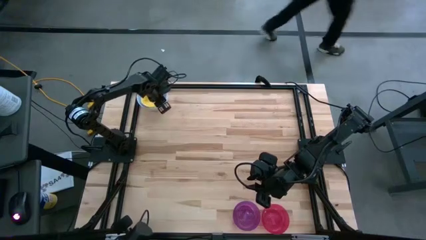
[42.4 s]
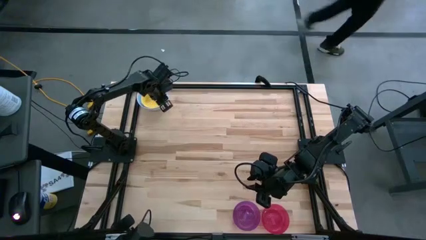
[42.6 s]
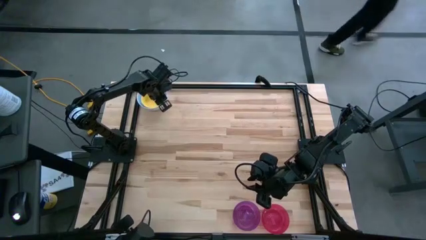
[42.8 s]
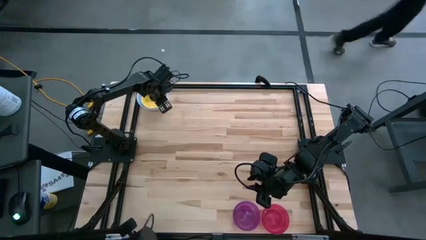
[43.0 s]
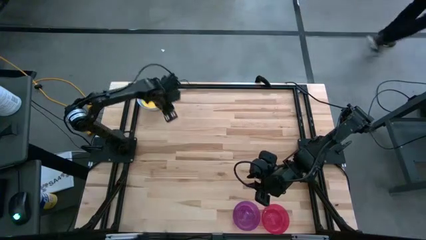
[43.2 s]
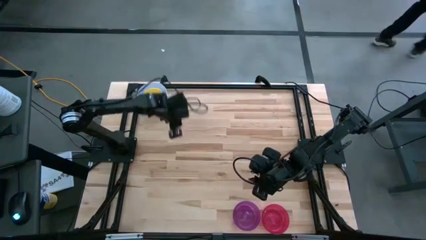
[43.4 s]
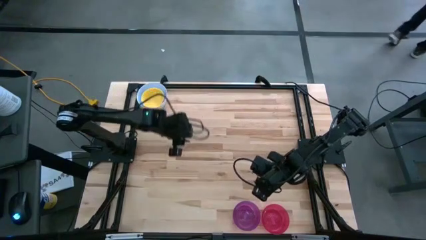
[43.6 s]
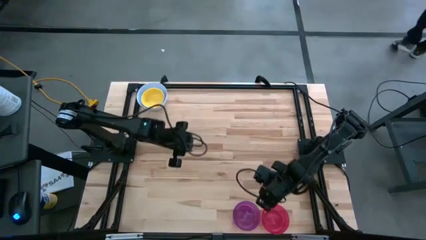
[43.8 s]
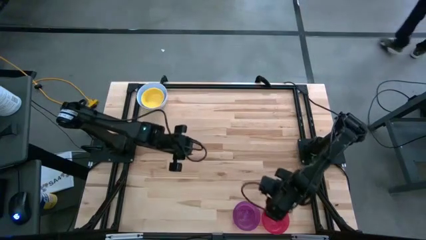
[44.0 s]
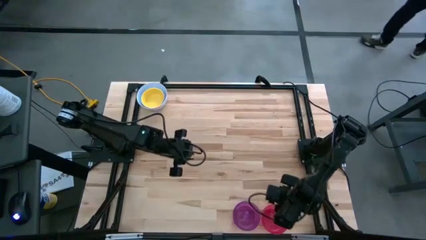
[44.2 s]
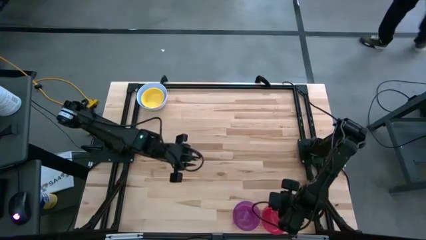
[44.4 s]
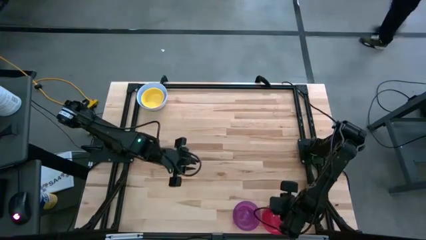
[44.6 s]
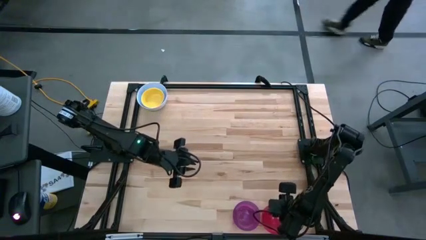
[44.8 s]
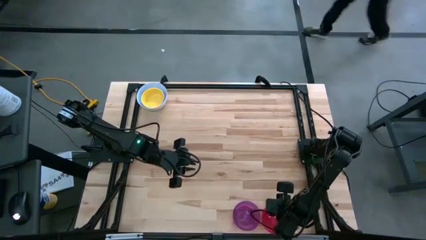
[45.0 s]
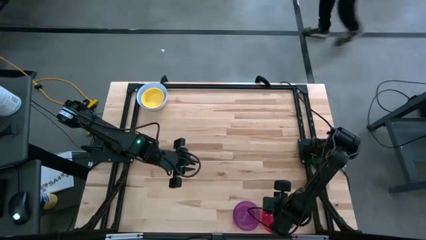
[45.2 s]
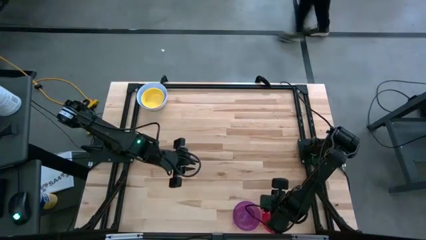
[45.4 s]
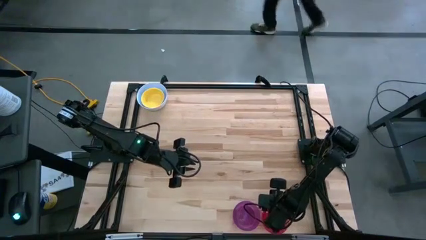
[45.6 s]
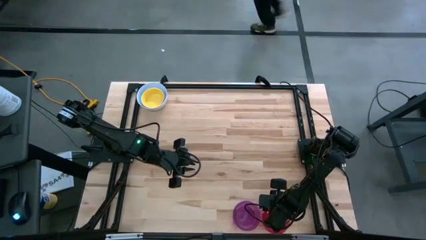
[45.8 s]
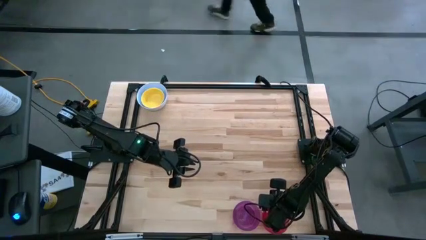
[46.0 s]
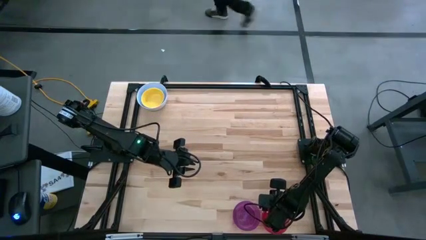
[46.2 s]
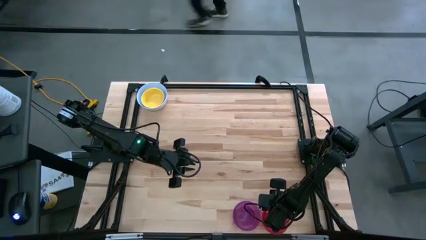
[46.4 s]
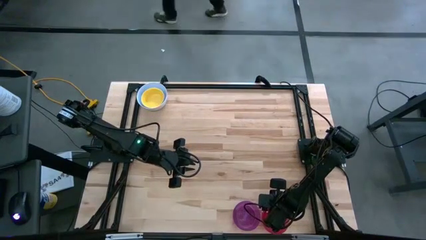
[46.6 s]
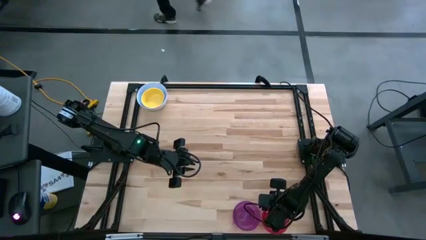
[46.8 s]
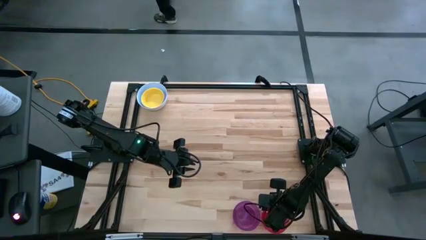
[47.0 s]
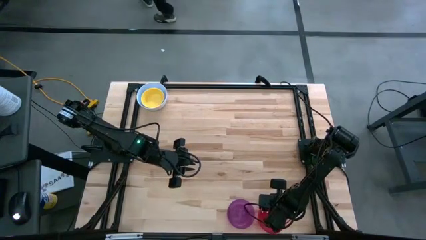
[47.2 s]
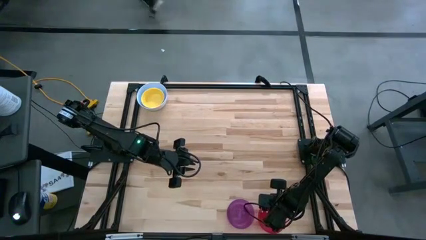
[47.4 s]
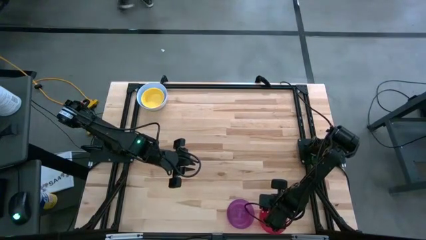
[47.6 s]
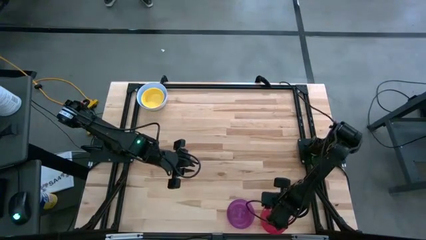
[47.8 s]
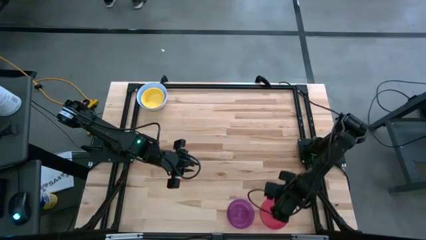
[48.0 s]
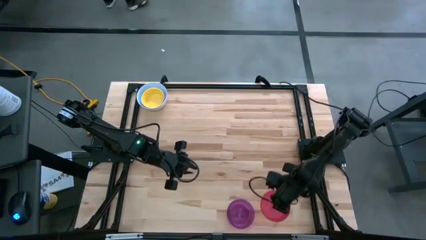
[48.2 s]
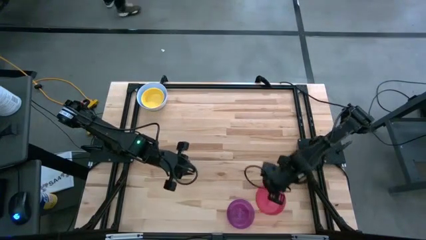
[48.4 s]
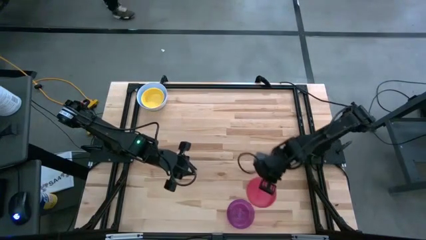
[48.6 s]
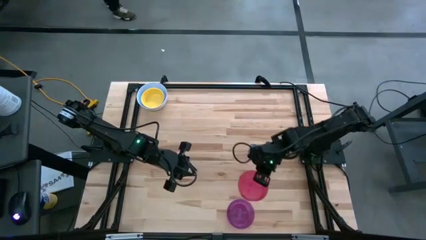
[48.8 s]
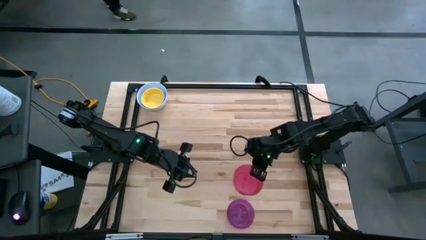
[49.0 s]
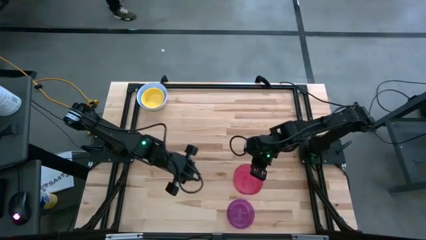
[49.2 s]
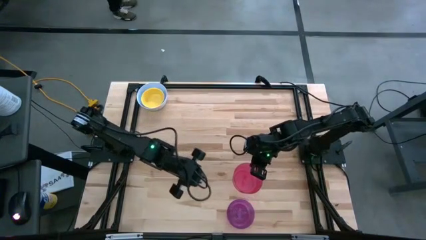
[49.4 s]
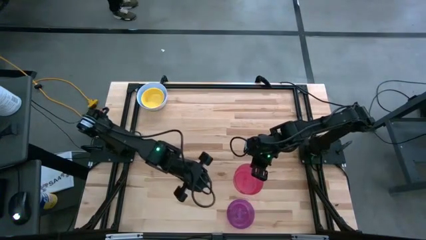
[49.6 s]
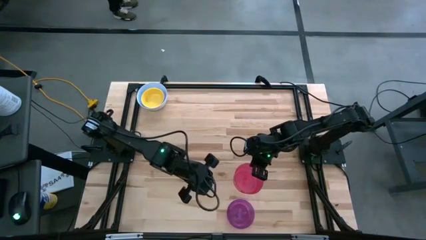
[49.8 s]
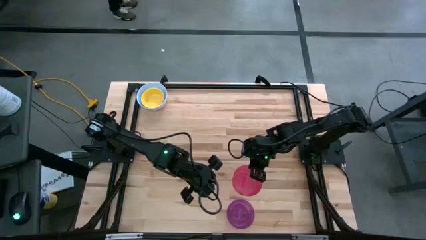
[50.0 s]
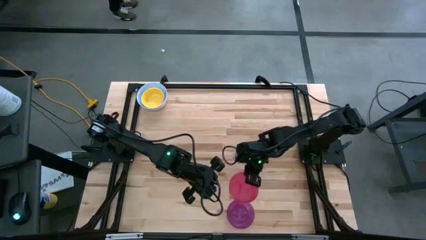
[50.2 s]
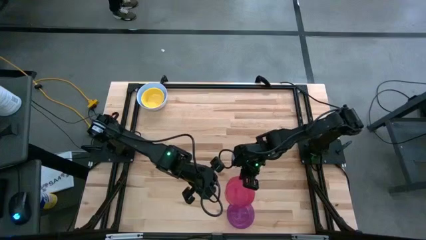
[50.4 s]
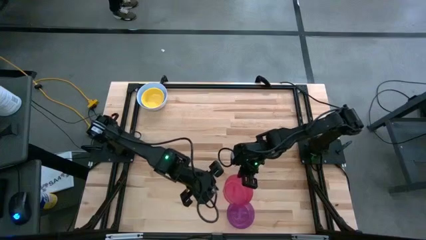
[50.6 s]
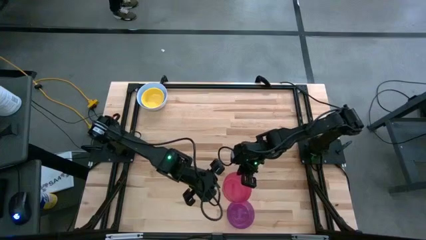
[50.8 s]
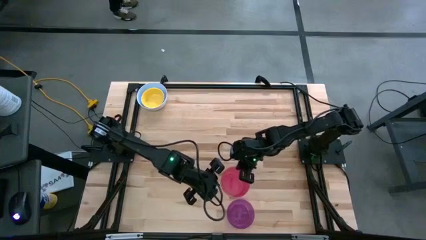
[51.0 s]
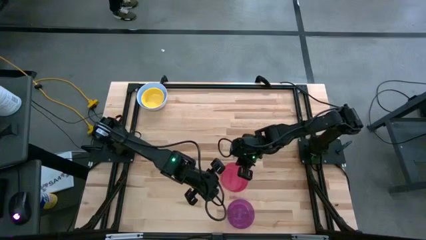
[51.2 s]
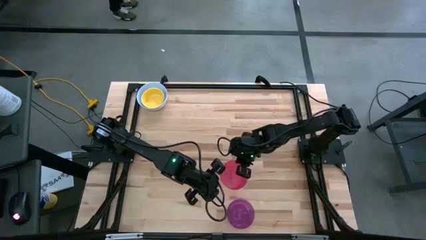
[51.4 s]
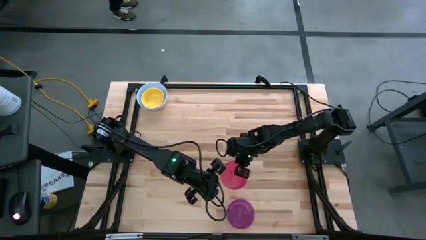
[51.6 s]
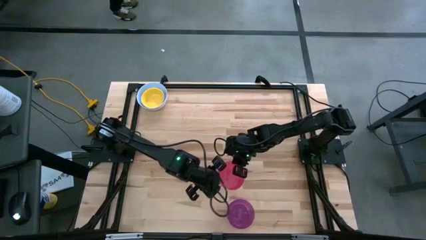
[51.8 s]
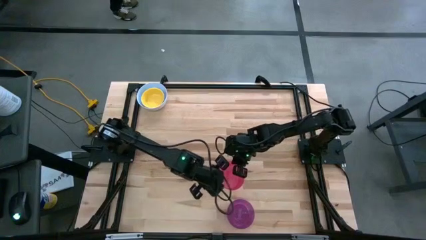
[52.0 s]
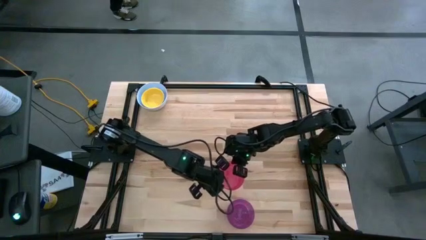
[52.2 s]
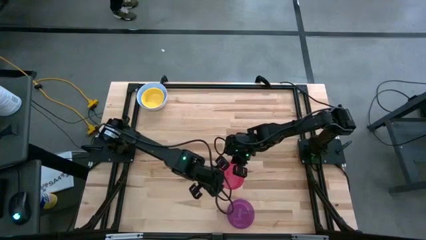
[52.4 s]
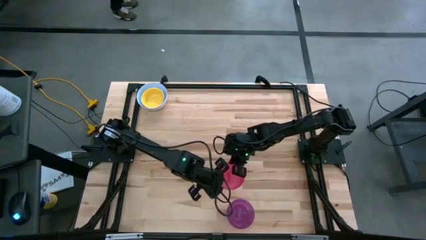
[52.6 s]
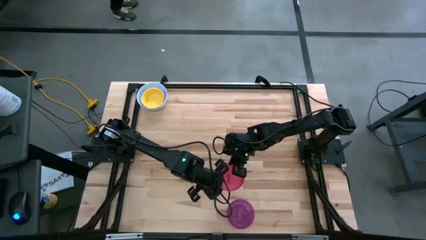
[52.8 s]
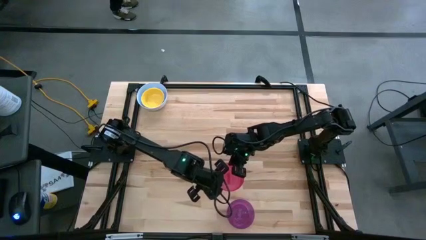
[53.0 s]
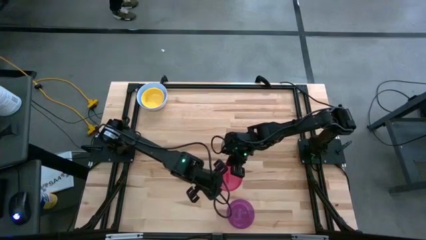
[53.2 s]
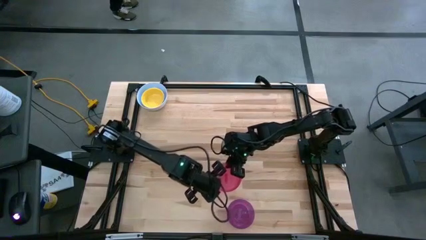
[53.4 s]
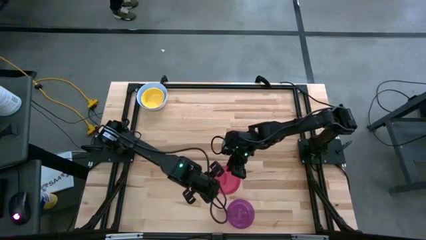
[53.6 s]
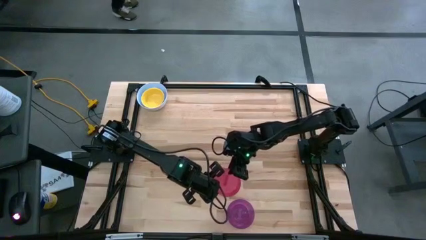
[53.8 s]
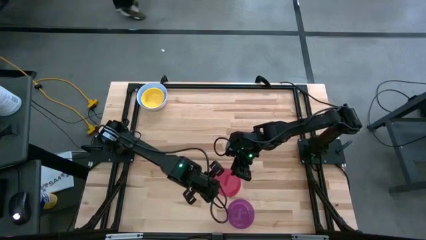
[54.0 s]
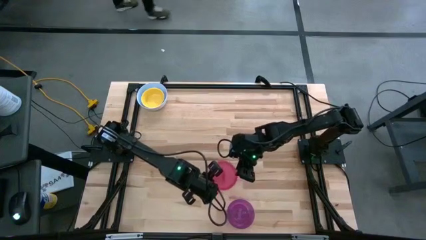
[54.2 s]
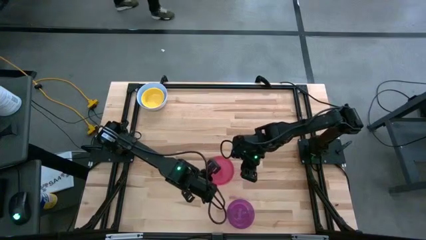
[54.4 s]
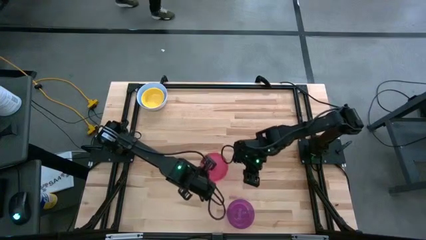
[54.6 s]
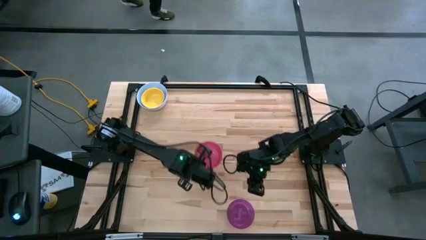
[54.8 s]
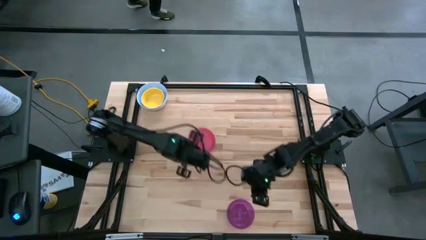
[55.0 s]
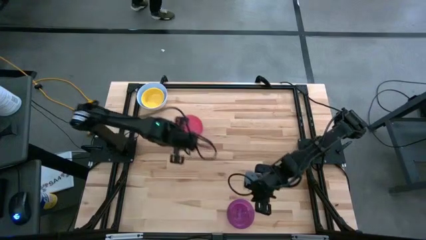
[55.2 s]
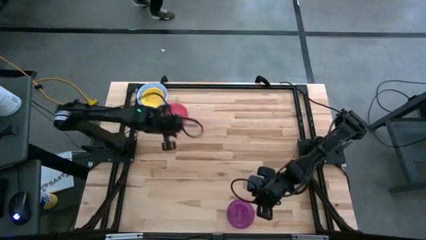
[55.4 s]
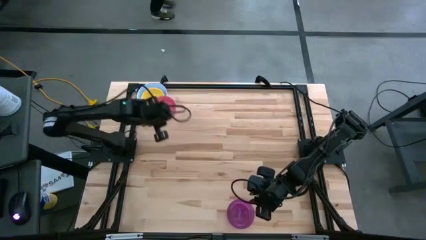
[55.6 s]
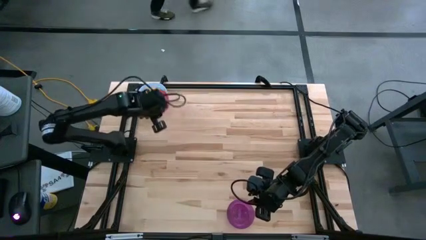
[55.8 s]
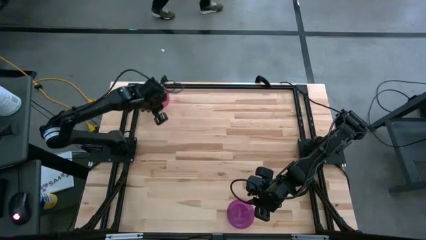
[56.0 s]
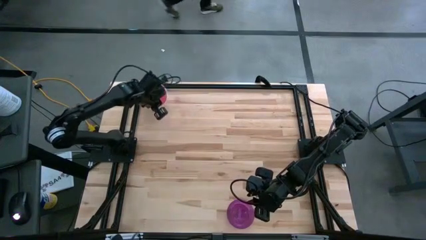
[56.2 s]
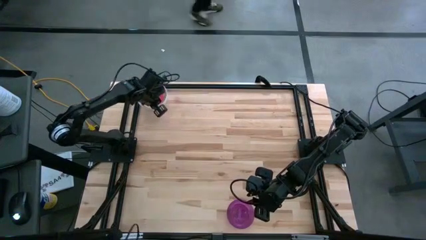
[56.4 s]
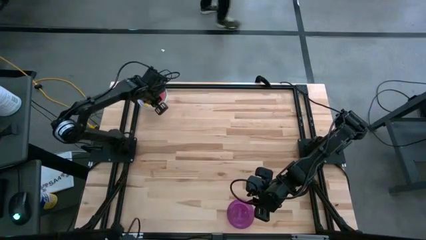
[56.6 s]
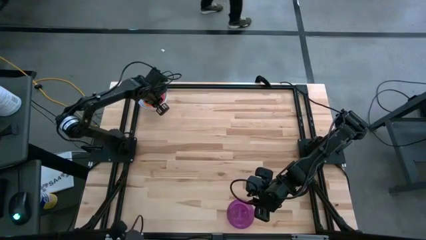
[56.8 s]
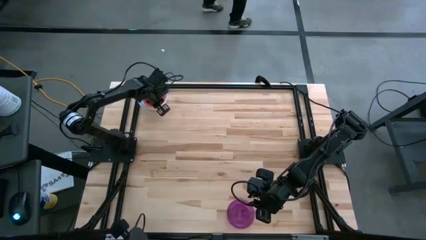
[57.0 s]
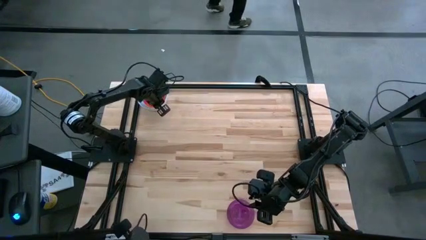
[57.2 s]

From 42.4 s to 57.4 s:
Stack the red bowl on the yellow bowl

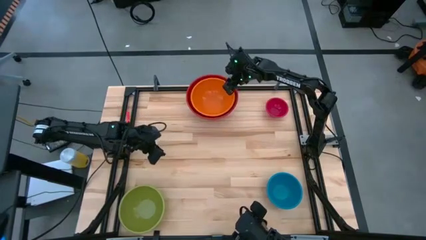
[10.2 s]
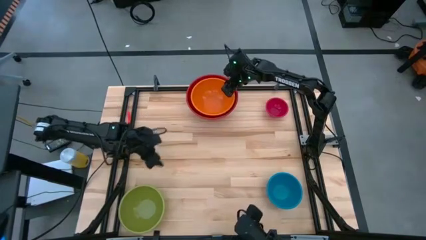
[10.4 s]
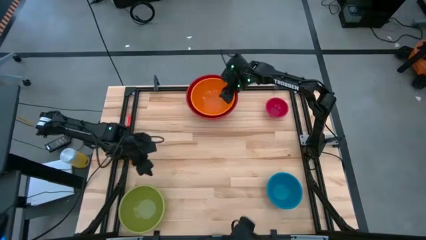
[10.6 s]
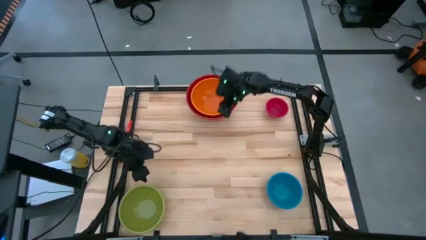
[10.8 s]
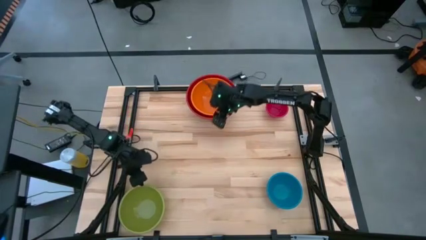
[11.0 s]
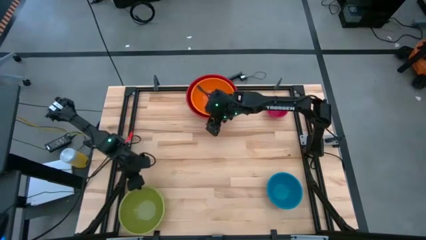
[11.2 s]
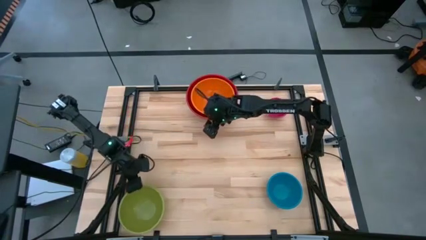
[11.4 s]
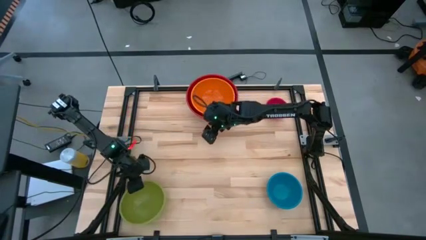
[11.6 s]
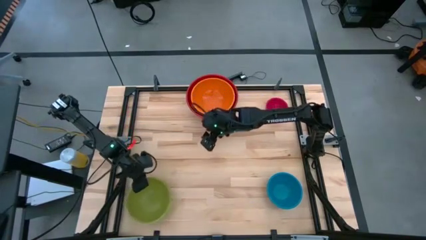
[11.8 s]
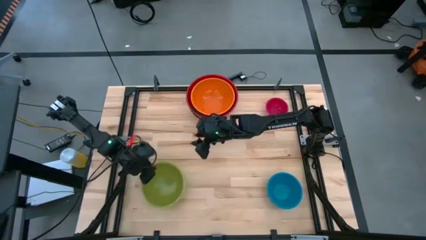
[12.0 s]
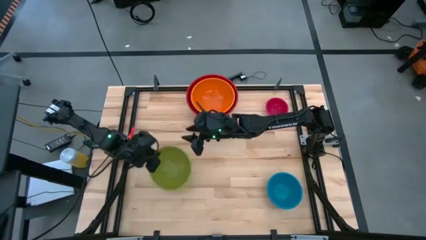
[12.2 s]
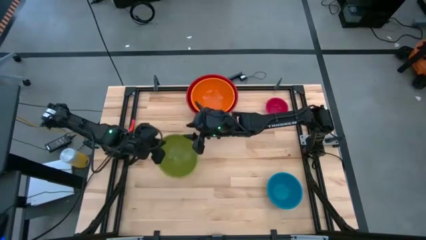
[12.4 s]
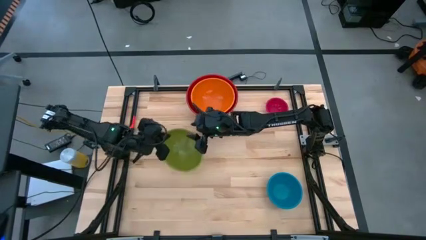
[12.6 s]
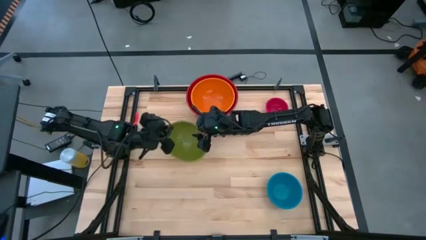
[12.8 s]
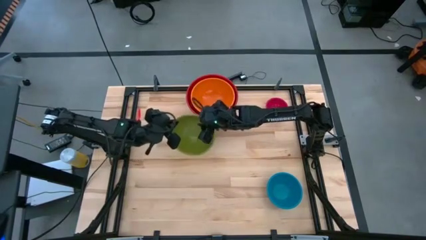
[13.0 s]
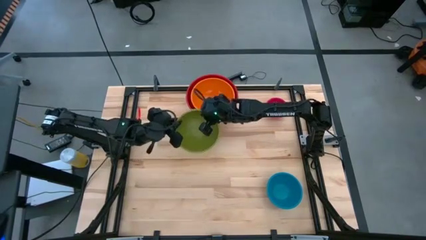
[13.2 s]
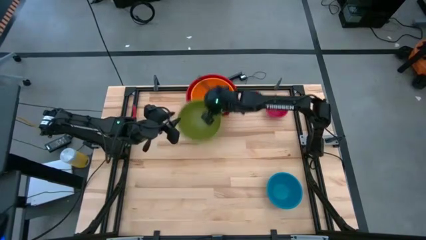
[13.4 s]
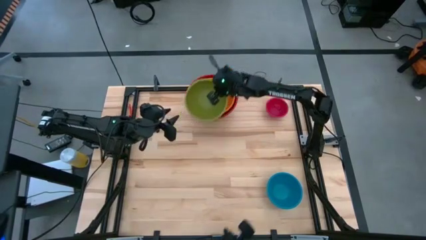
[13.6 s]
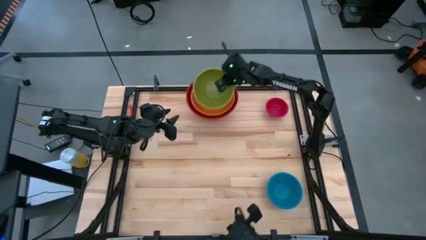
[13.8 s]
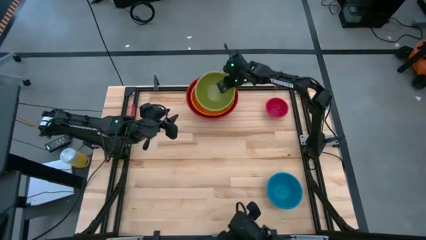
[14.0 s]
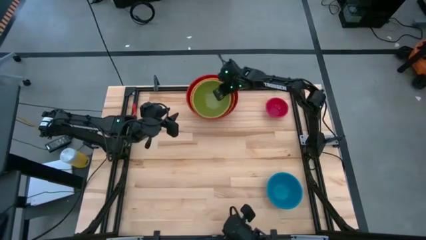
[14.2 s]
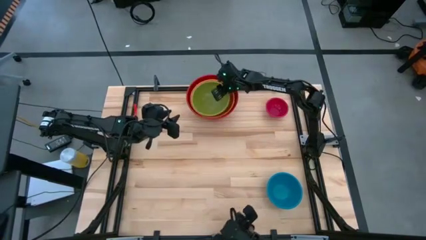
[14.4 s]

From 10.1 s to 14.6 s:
Stack the green bowl on top of the orange bowl
